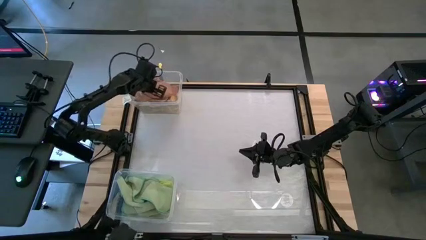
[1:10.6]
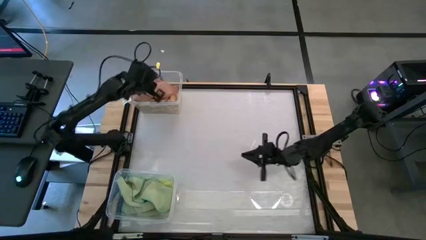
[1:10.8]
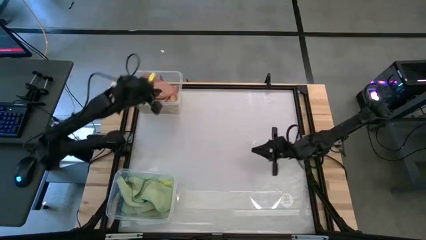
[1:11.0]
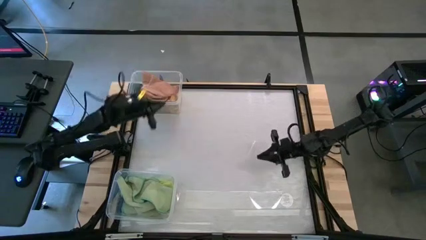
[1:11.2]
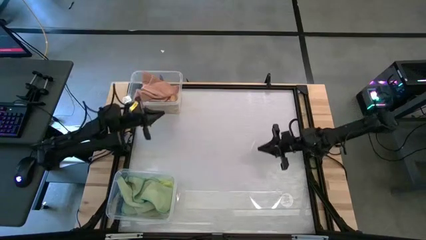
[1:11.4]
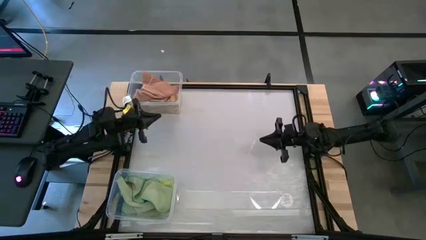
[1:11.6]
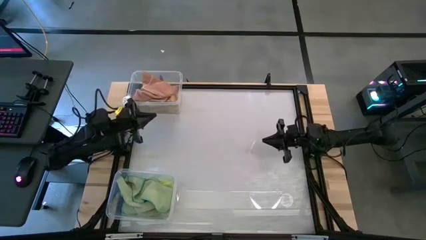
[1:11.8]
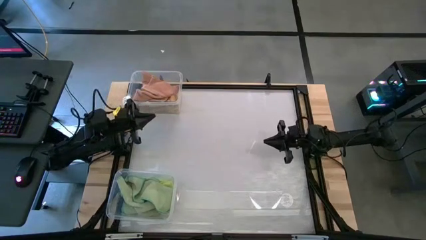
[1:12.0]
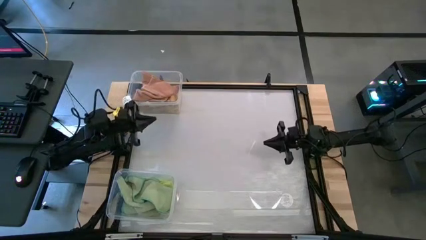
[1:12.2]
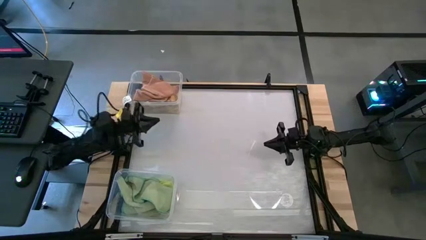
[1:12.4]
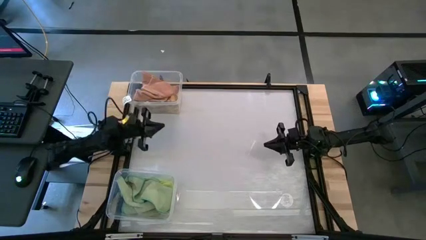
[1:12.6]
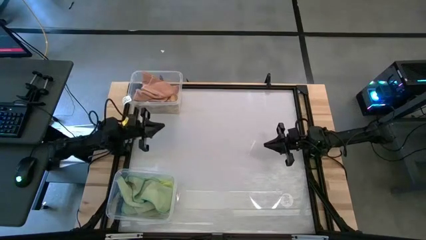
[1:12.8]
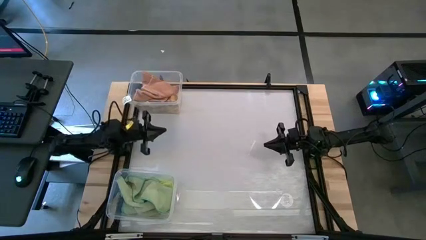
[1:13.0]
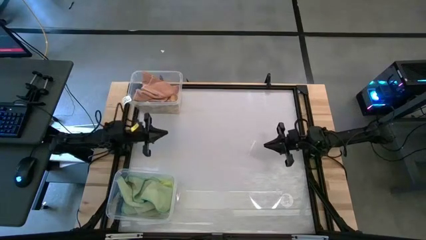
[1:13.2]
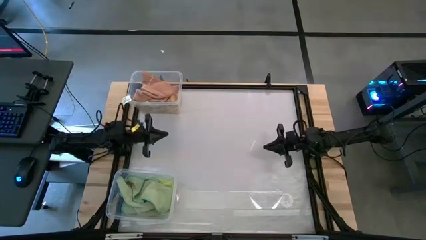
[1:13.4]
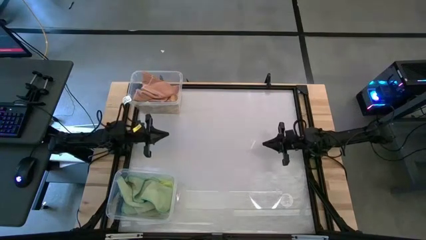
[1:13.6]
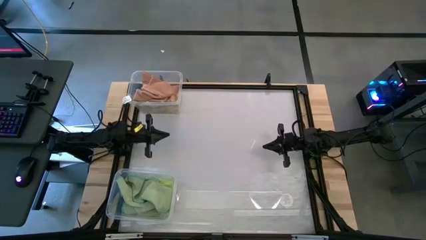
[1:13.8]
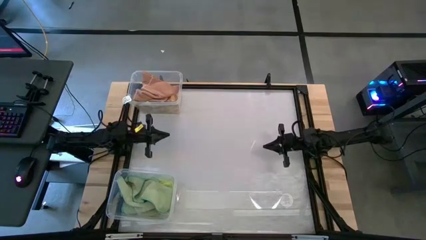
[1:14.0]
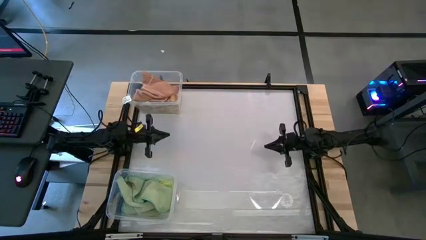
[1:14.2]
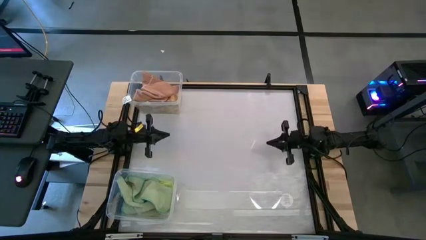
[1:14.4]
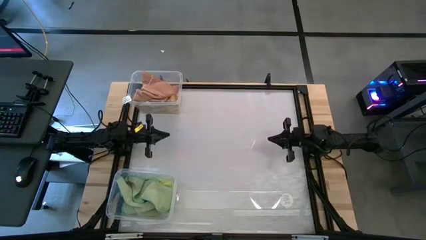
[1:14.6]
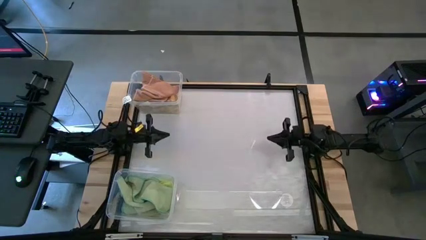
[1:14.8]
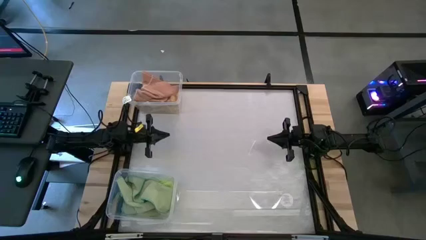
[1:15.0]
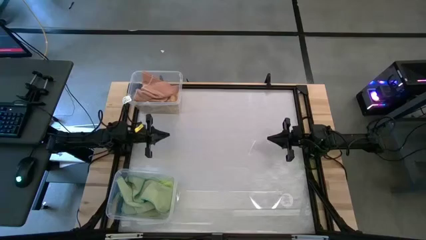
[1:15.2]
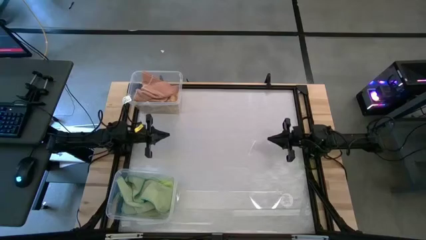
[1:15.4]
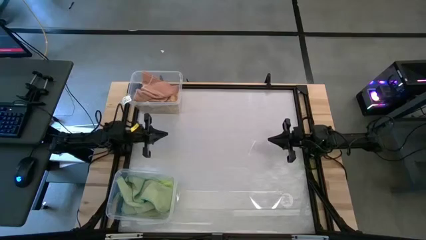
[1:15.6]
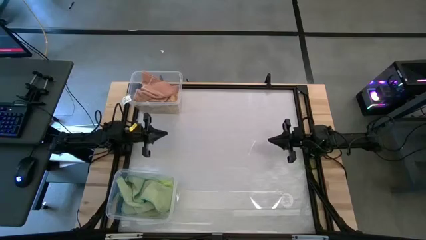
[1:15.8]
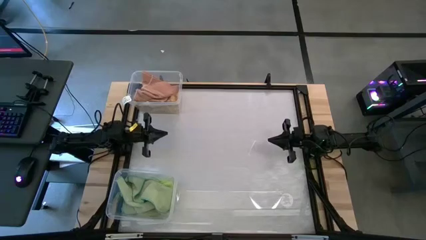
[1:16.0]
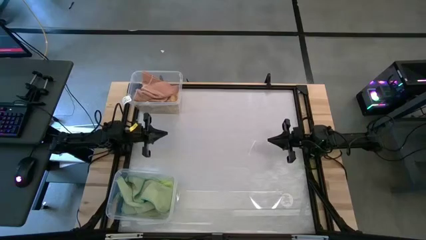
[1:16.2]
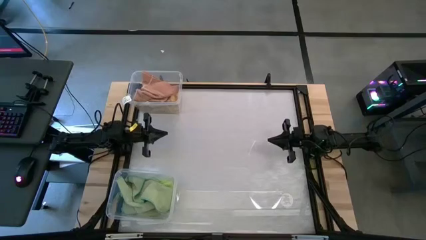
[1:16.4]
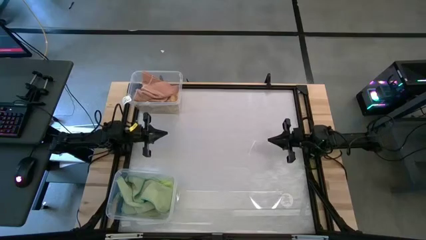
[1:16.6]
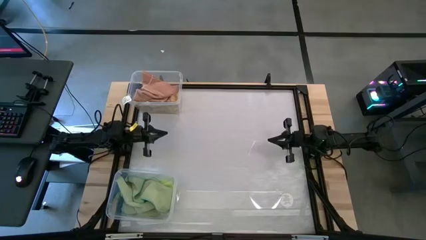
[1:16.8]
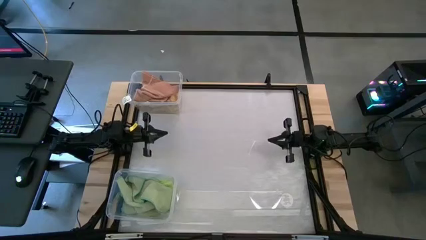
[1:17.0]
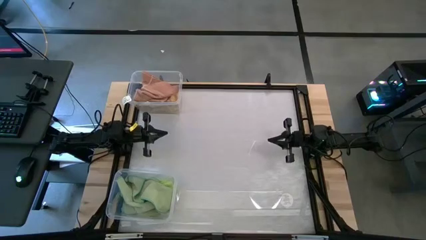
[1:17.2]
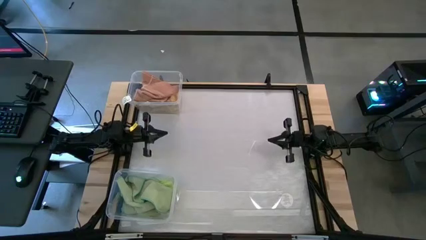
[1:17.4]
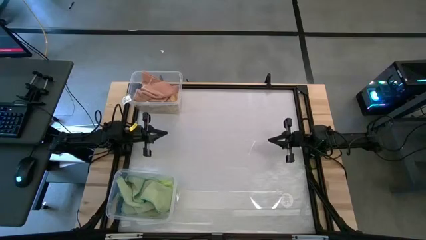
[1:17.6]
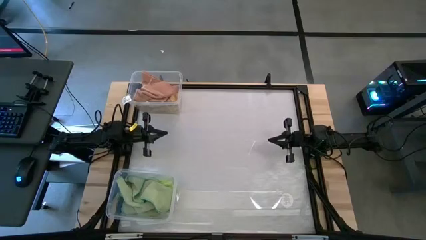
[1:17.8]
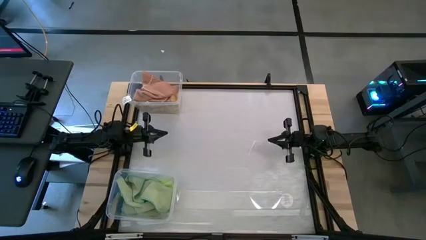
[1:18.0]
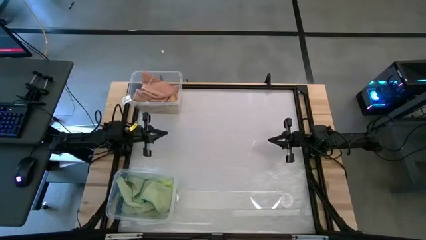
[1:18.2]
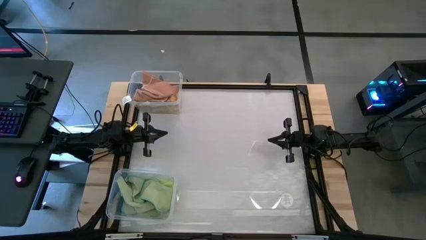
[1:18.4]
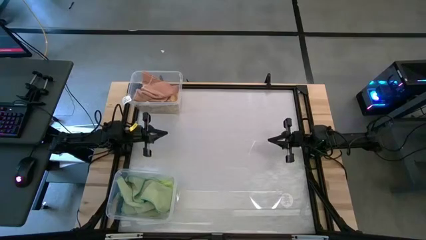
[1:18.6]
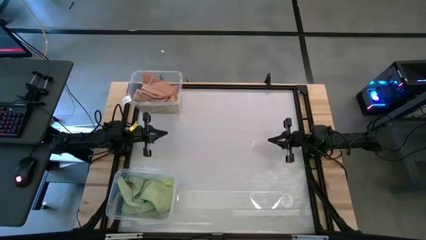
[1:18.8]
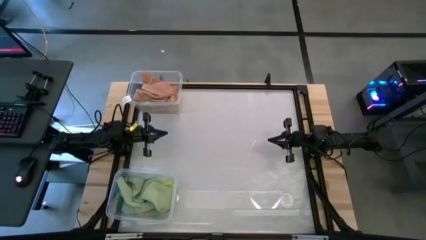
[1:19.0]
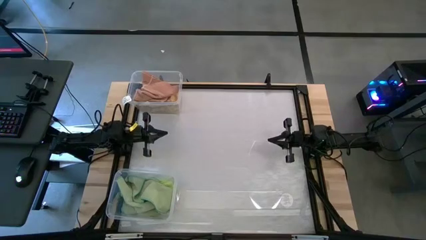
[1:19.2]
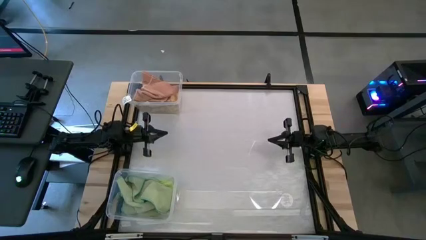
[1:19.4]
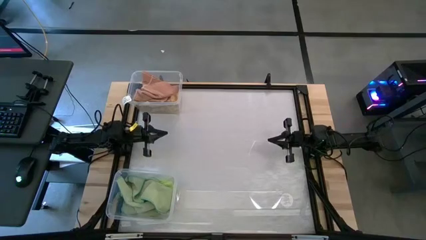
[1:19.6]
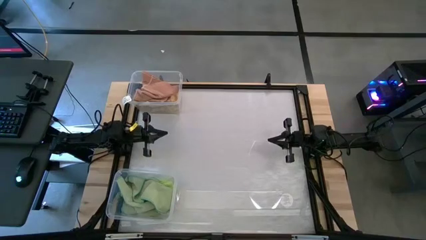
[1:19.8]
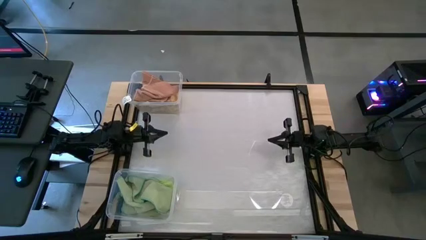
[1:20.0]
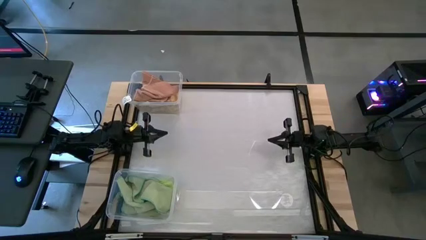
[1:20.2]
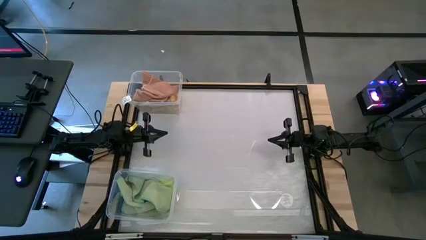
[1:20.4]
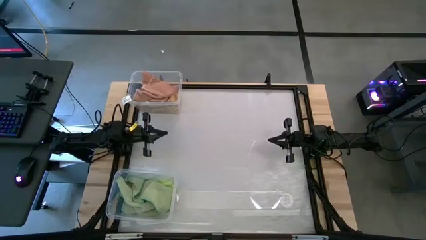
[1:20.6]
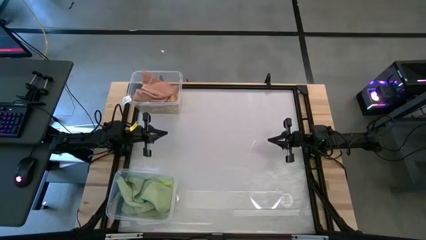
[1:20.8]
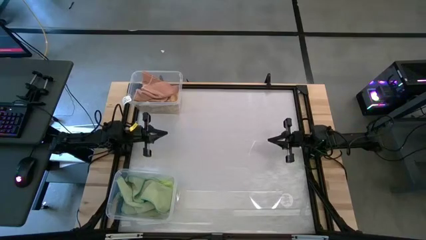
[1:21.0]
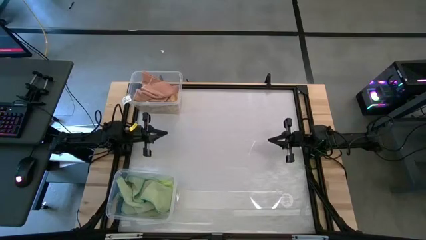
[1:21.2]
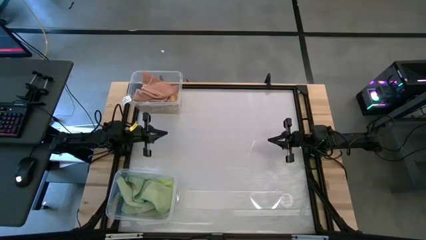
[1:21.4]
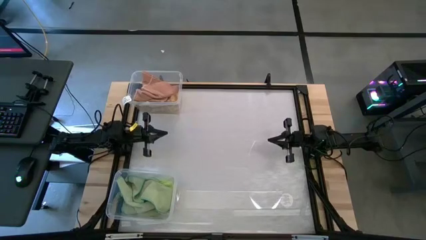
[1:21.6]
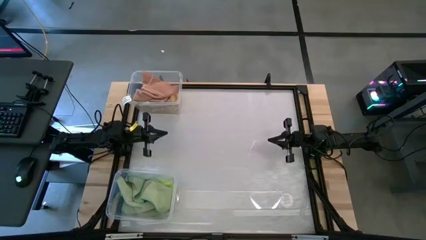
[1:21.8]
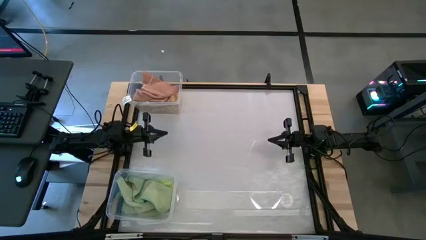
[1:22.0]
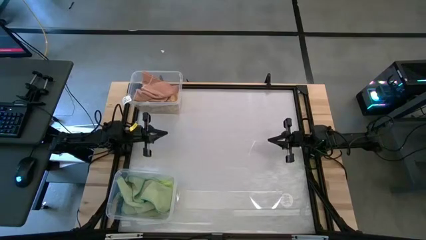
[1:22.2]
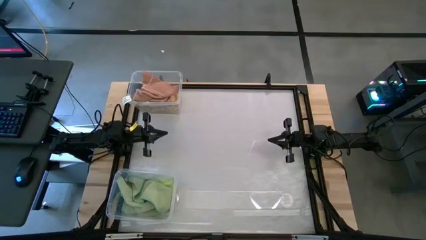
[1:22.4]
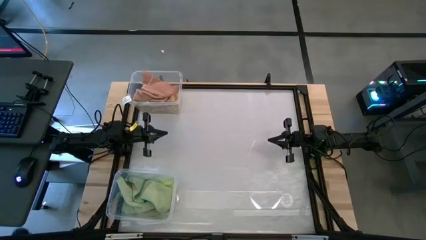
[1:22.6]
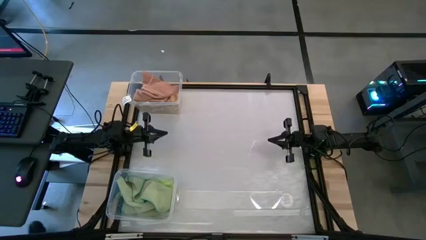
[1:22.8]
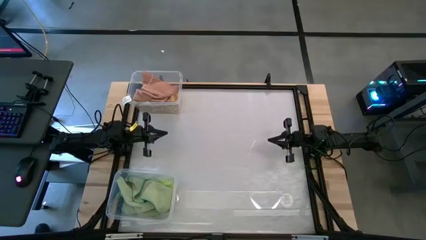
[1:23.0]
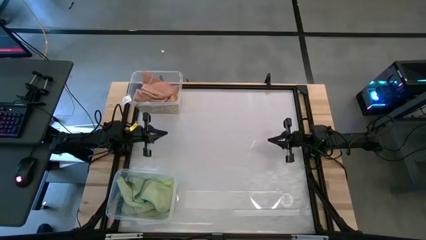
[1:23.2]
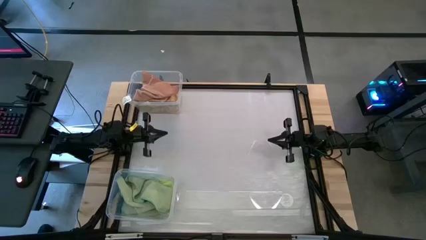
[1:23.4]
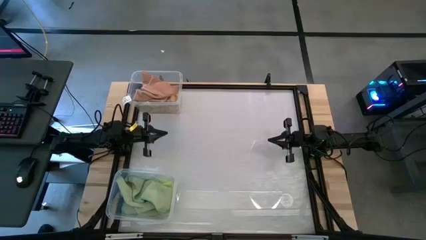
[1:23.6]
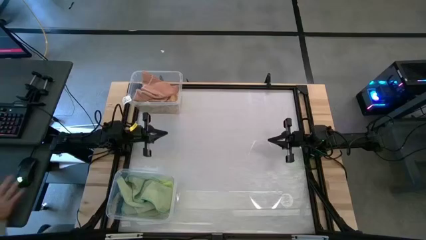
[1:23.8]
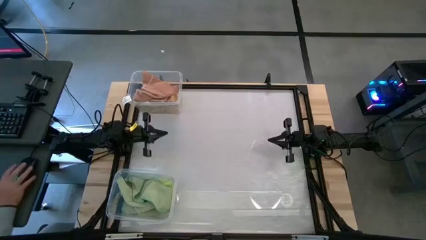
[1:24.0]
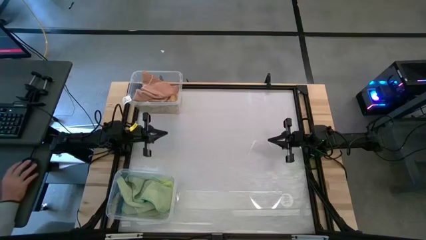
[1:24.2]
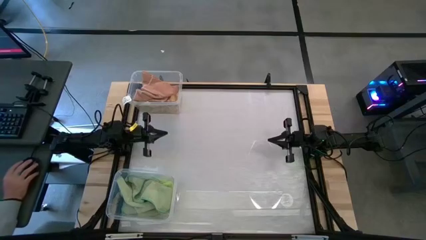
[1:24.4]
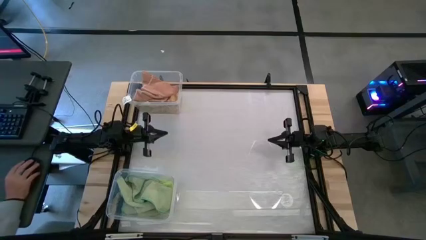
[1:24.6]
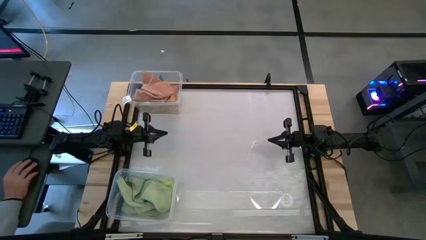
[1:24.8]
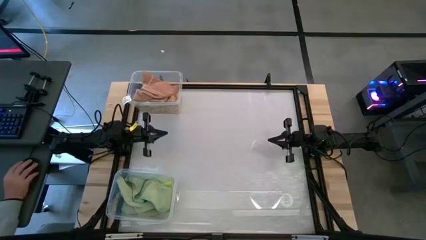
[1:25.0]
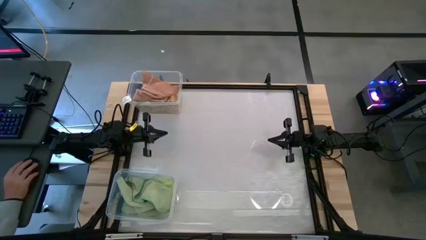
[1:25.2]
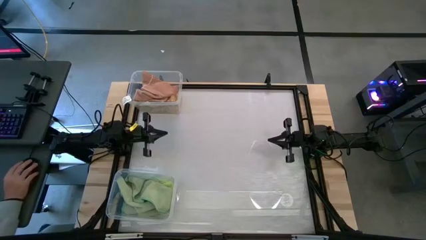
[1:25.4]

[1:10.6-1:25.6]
Task: Sort towels by color in basket
Return to Home Position

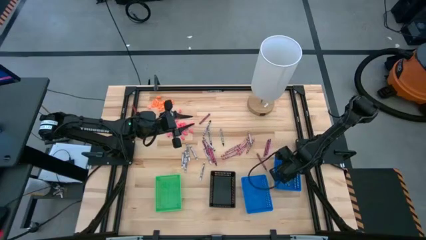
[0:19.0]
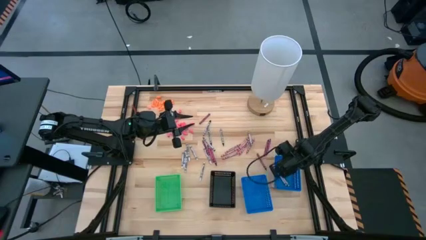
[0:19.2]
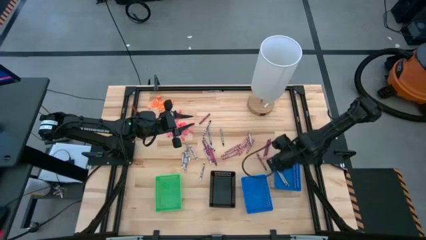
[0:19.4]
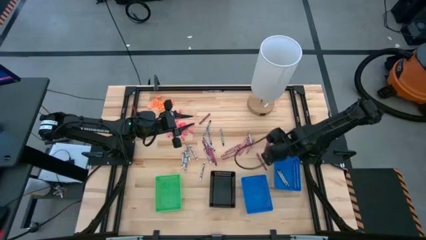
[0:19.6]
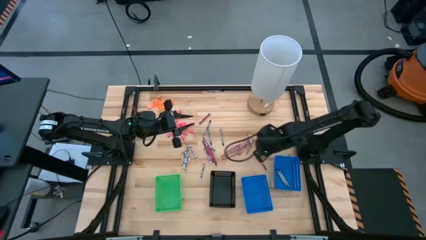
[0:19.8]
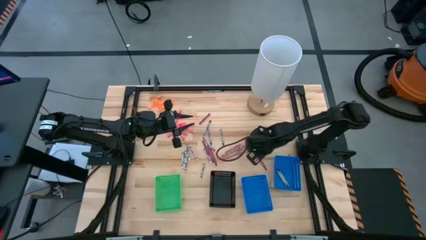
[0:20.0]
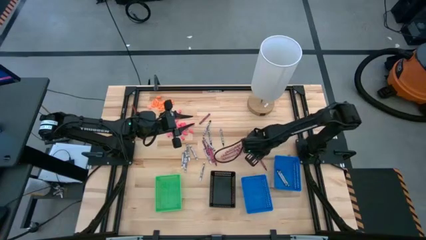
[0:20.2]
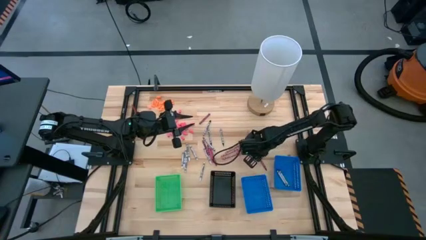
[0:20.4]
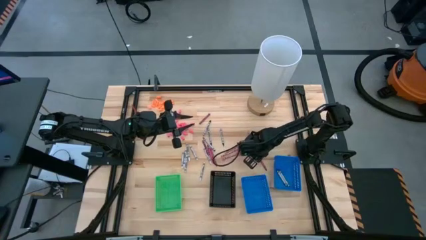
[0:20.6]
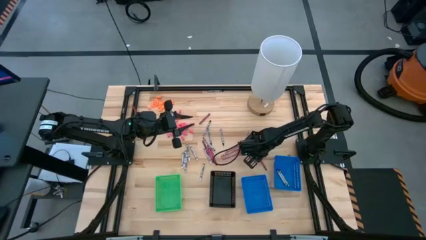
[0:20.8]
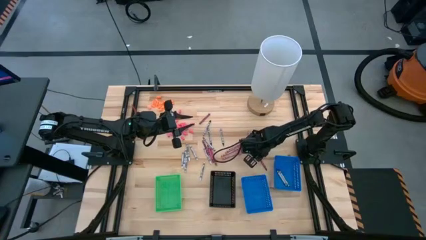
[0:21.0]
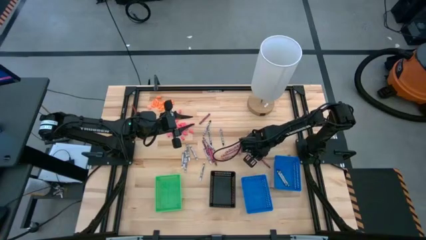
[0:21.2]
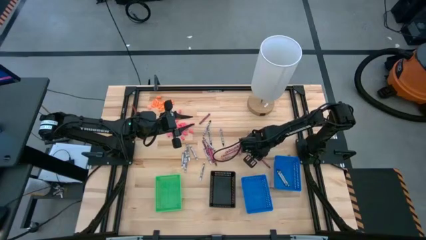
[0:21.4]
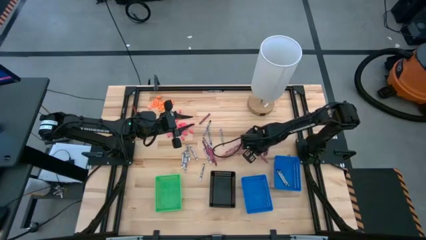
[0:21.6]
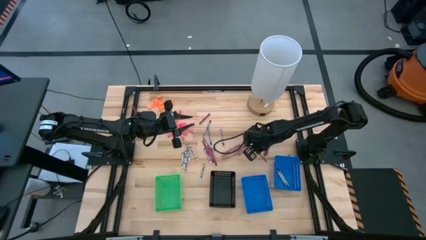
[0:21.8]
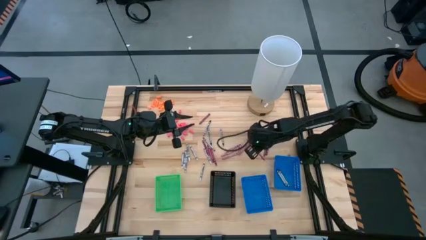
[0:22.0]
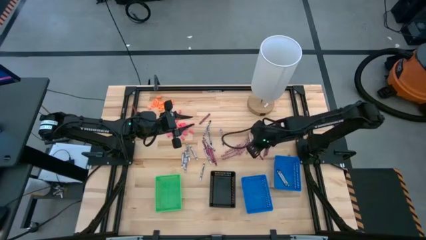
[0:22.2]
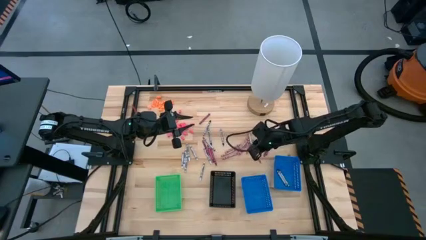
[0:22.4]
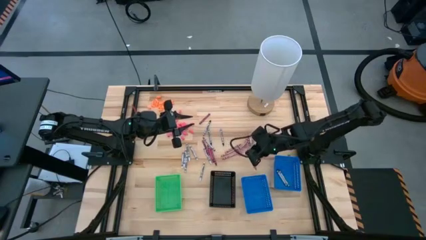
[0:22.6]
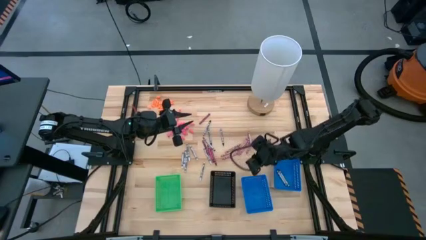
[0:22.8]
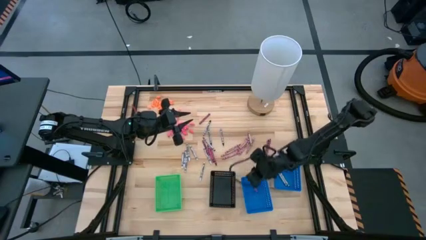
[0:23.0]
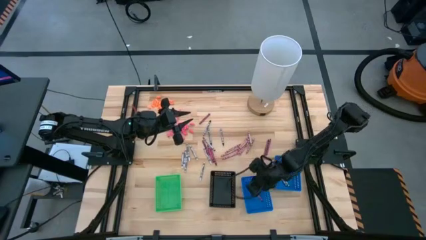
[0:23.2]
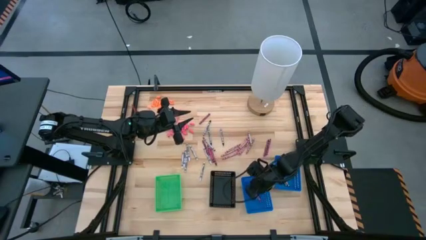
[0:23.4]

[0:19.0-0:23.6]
Task: Sort crayons
Put the red crayon into the left blue bin
